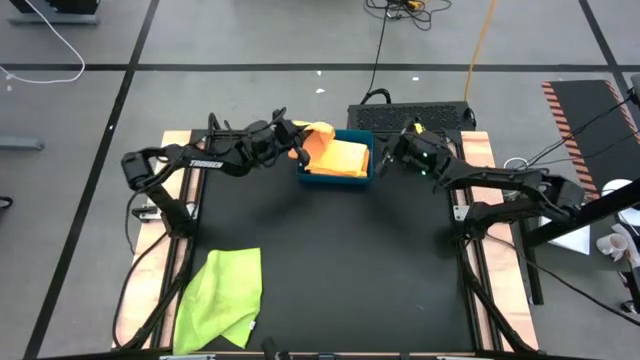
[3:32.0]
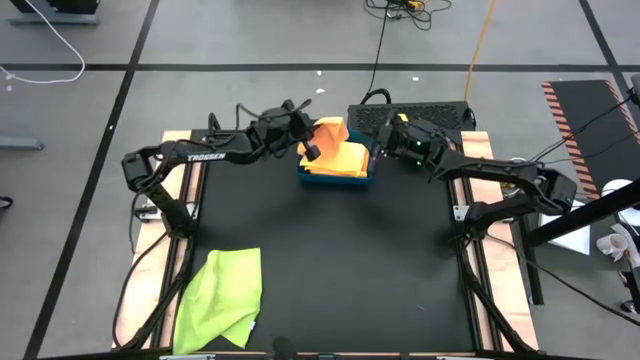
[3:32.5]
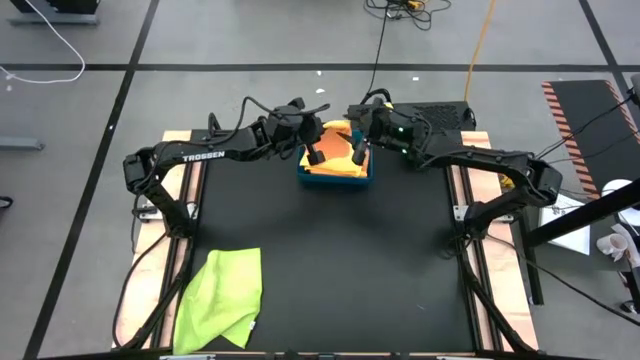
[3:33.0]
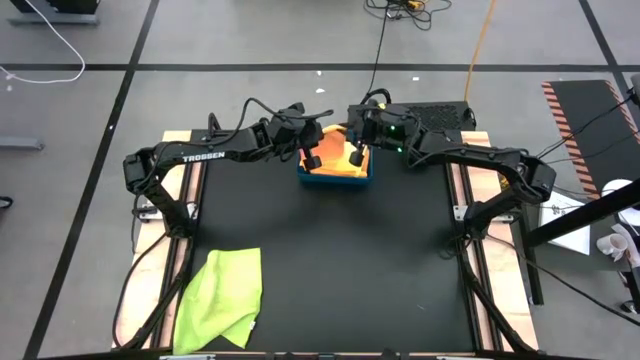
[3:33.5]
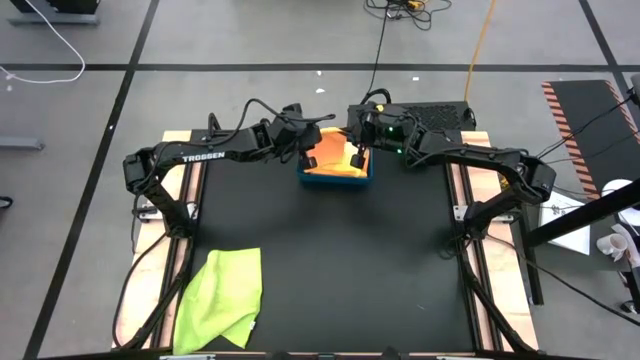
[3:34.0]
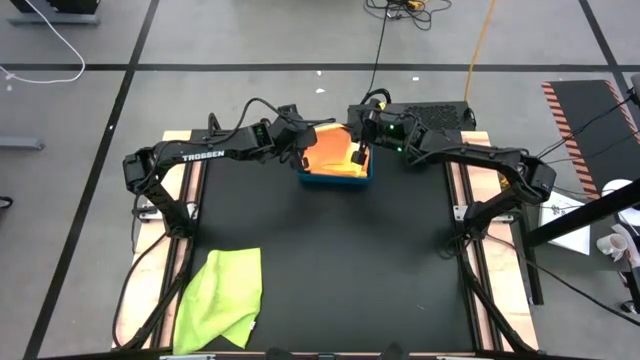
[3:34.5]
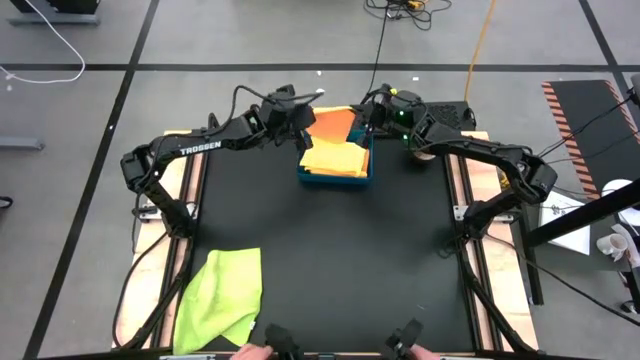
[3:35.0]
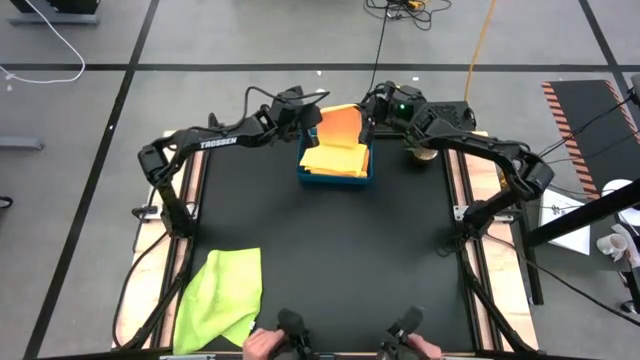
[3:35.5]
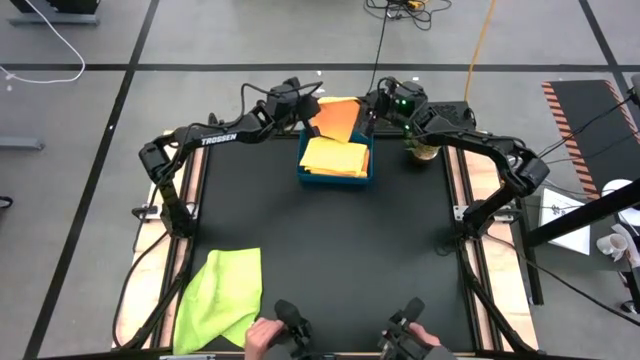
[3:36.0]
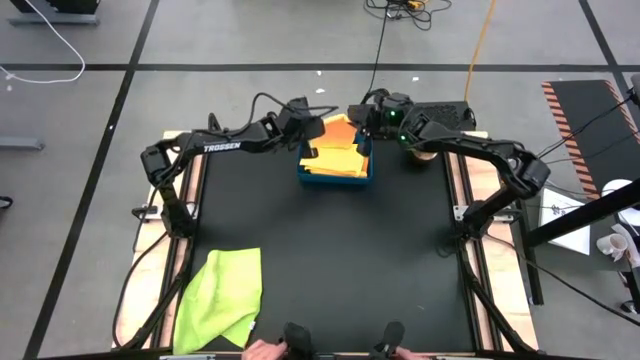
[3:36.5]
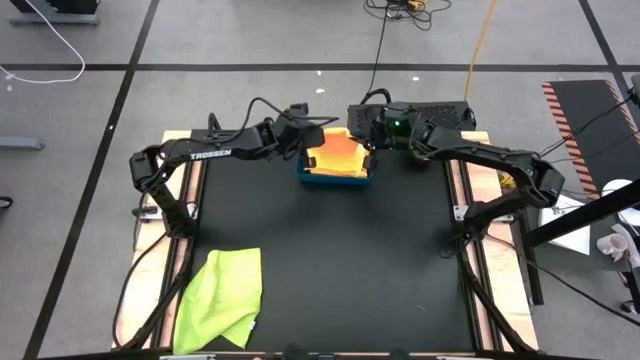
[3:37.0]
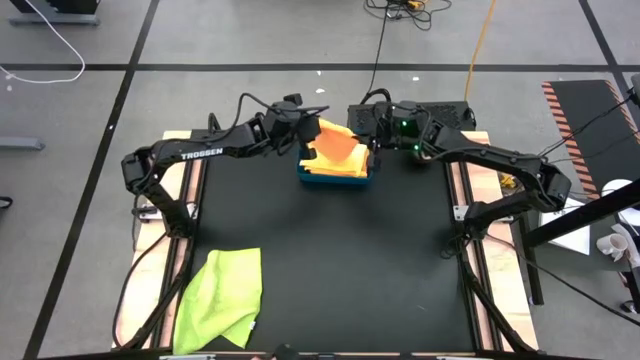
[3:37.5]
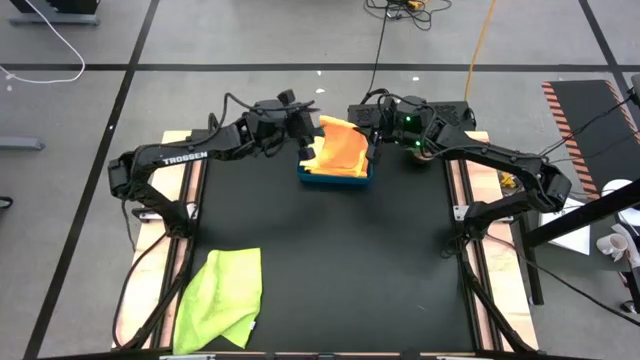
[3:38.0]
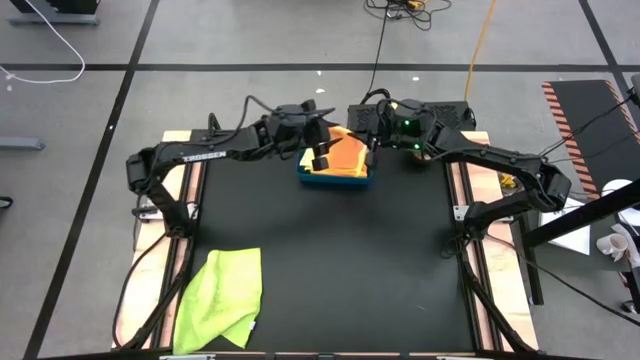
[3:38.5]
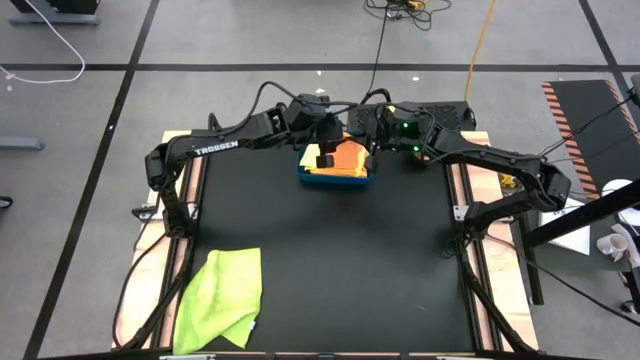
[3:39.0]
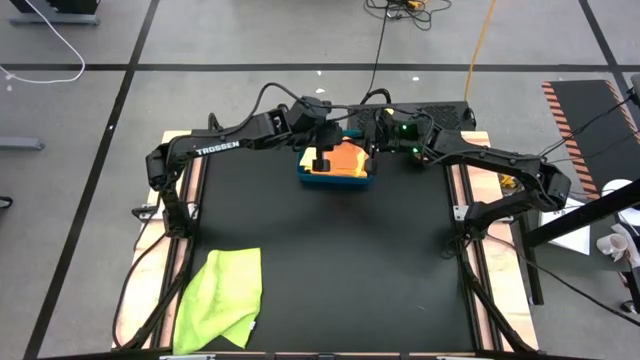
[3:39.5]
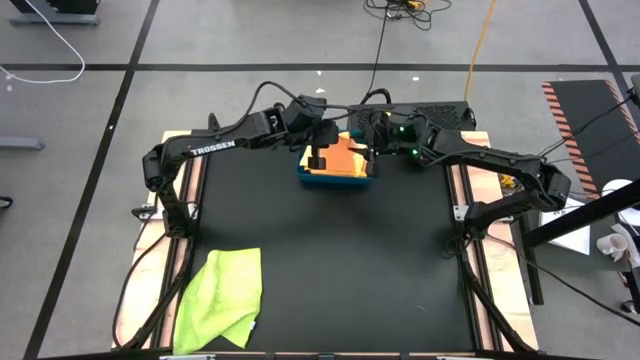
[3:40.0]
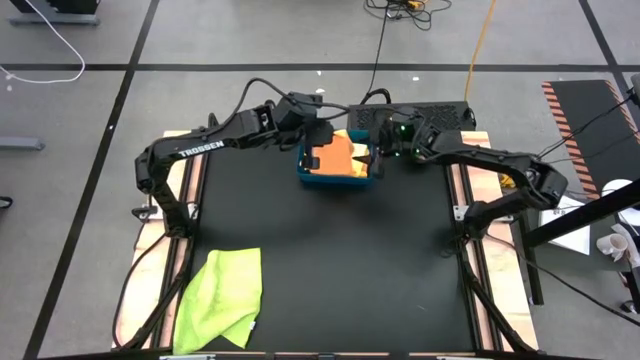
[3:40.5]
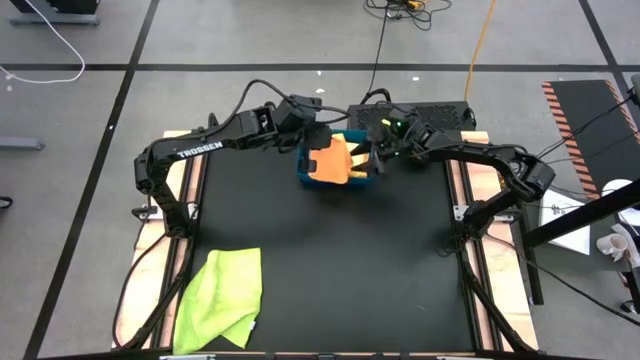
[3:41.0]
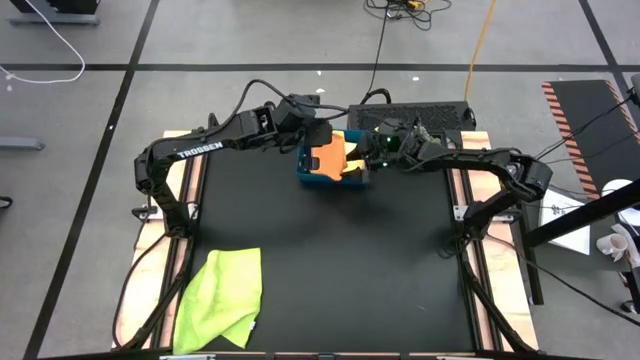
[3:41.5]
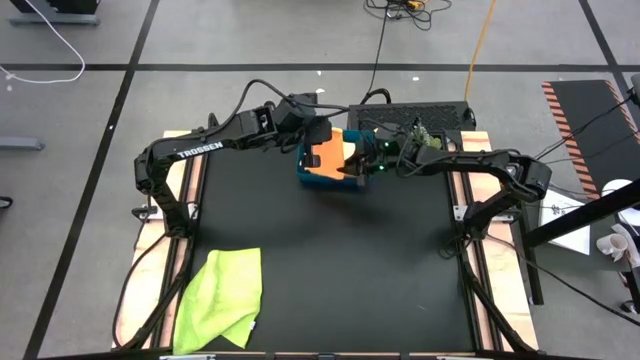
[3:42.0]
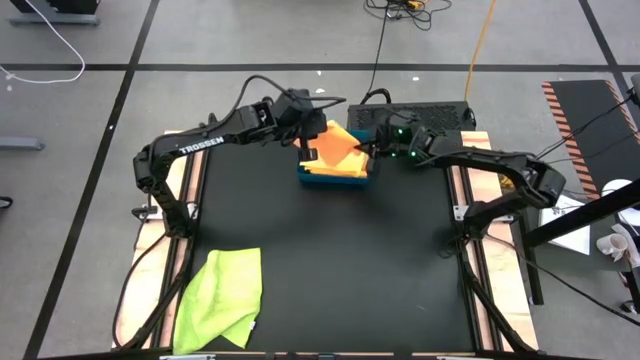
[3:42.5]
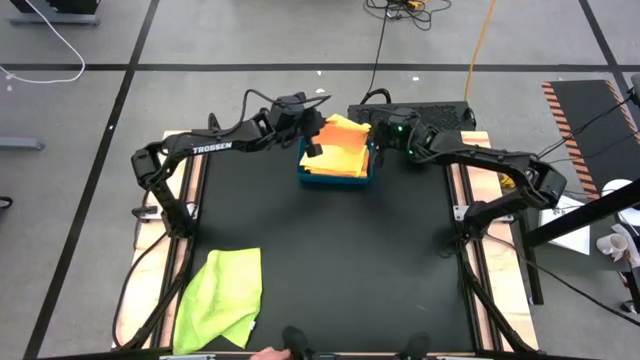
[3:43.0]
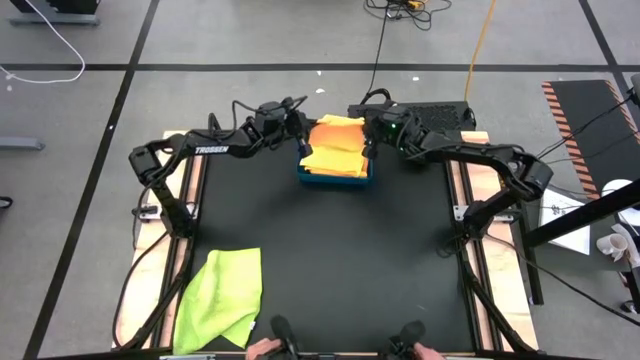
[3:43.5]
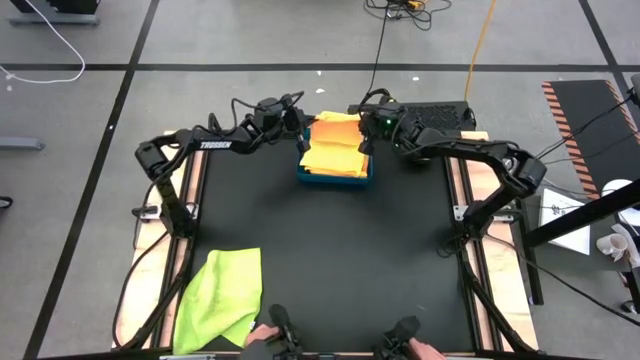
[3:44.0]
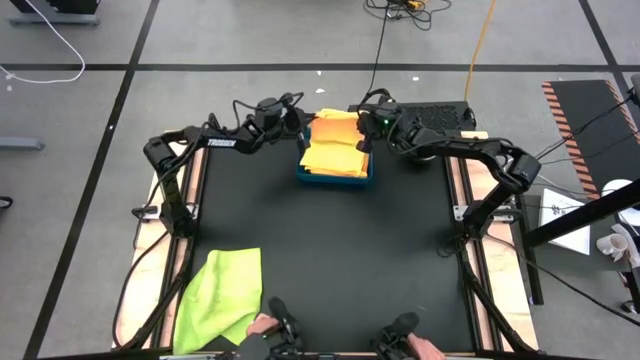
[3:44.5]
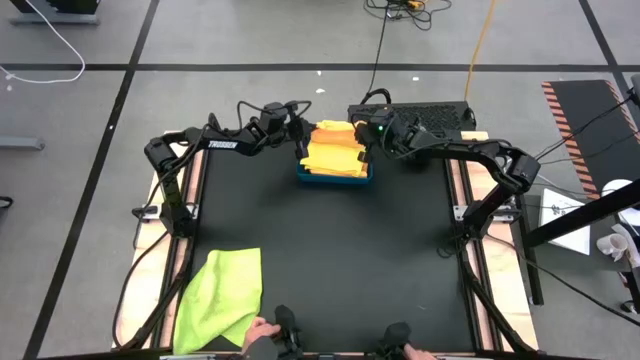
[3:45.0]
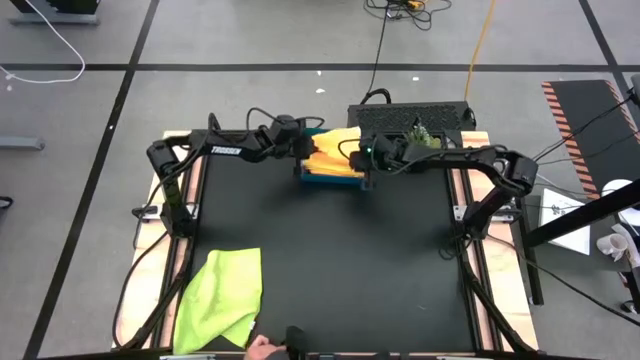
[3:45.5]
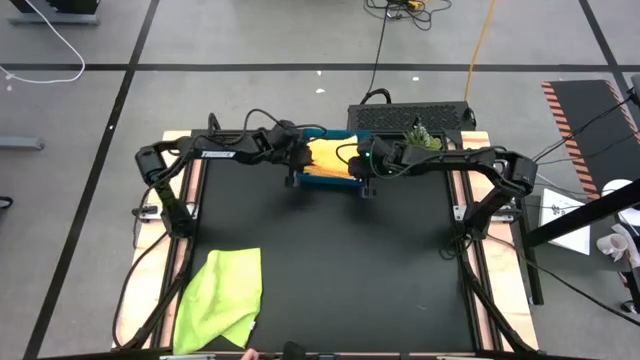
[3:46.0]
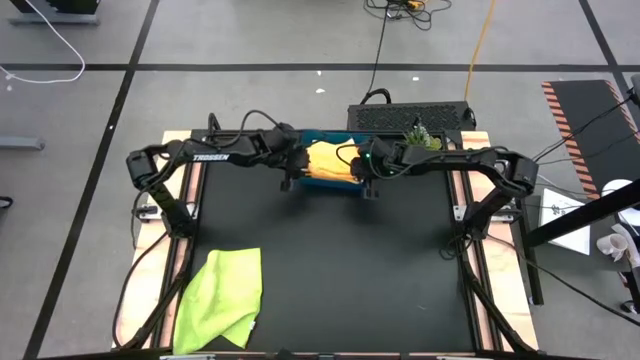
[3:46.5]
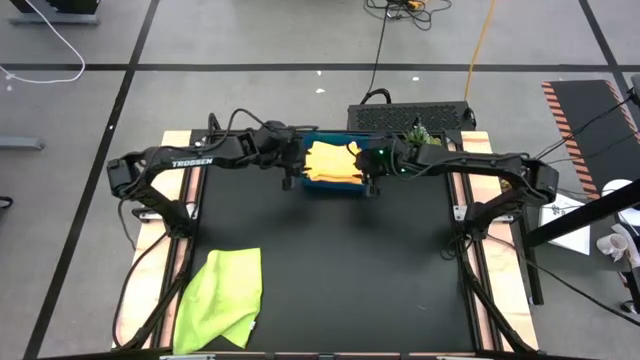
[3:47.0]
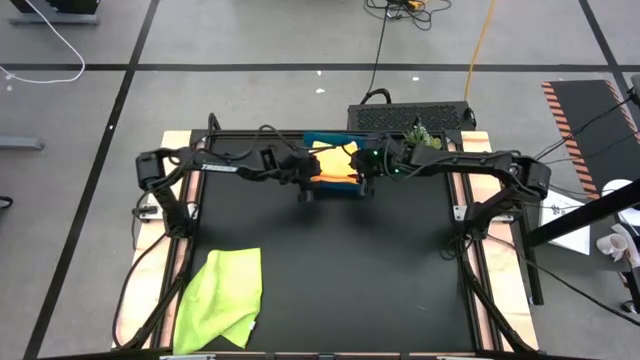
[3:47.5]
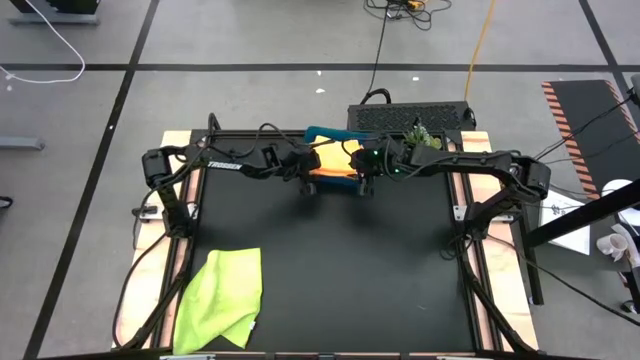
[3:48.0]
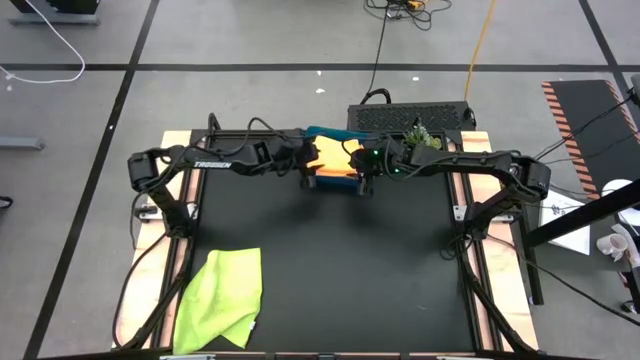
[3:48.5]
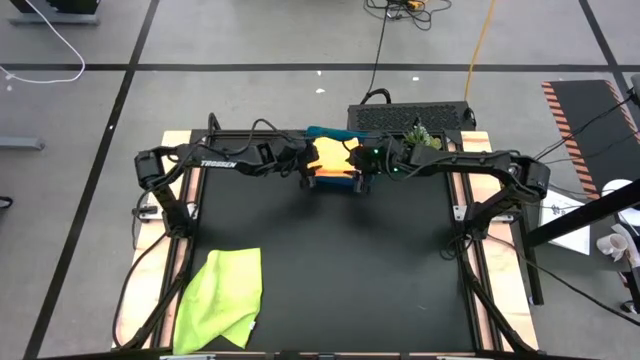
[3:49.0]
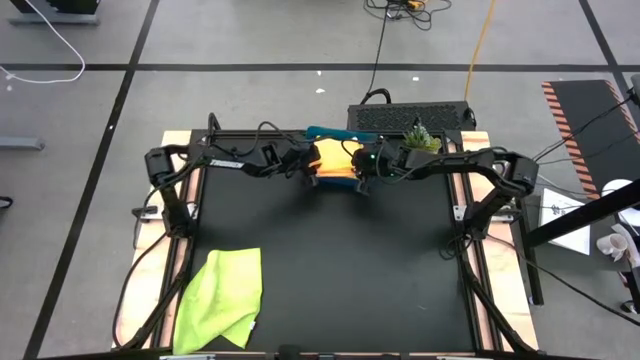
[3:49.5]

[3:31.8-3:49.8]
Task: Fold microfiber towels
Put the orange microfiber cloth into the dark blue bin

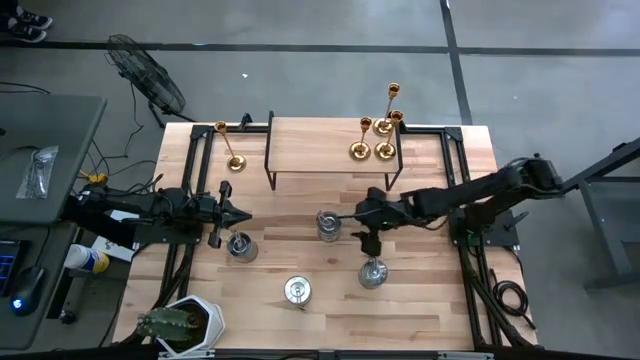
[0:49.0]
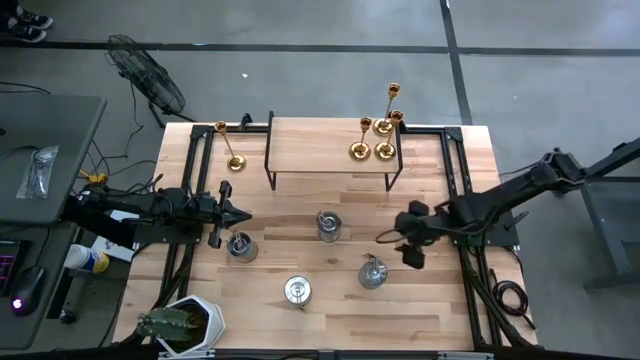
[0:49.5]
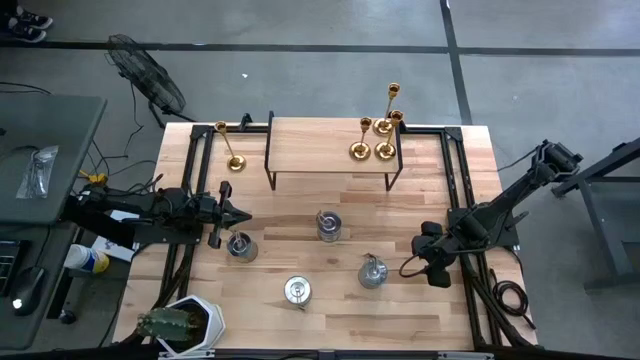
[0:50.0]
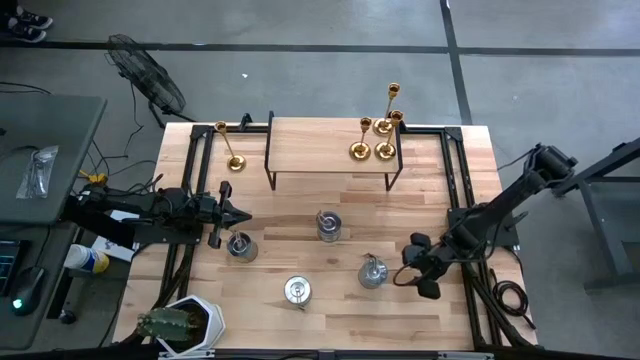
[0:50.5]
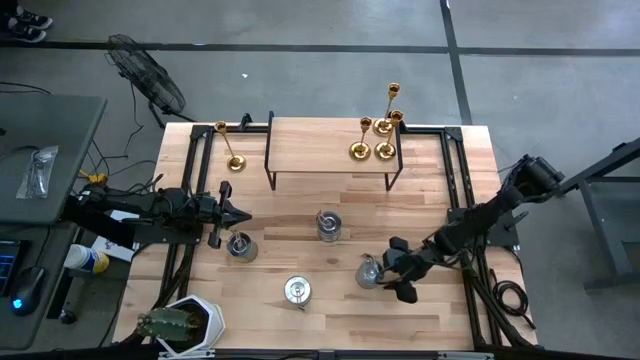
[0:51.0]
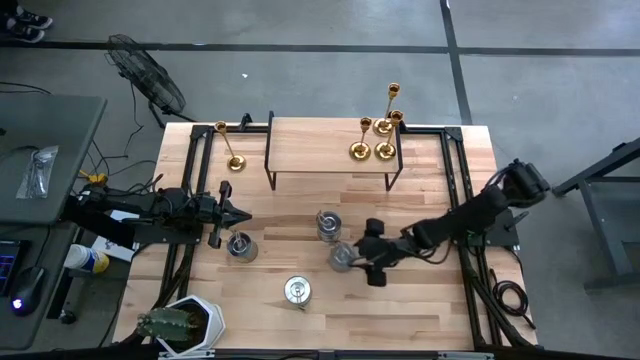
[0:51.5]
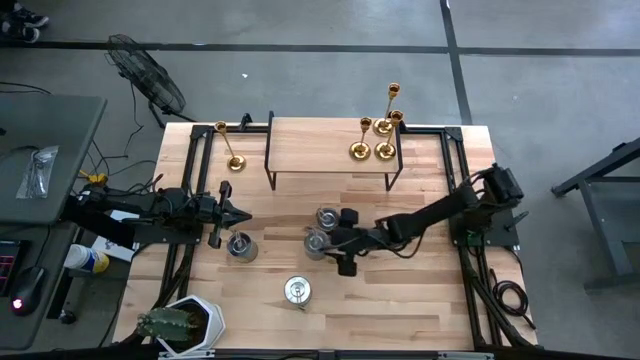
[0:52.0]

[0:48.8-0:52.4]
Task: Pick & Place candle stick holders
Move the middle brown scented candle to the center of the table

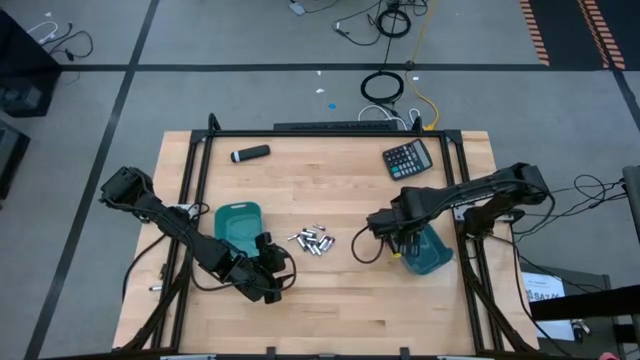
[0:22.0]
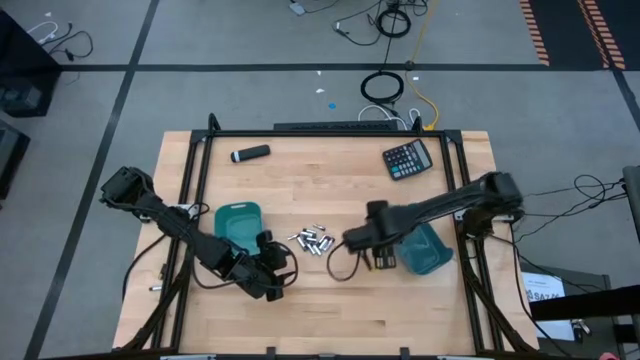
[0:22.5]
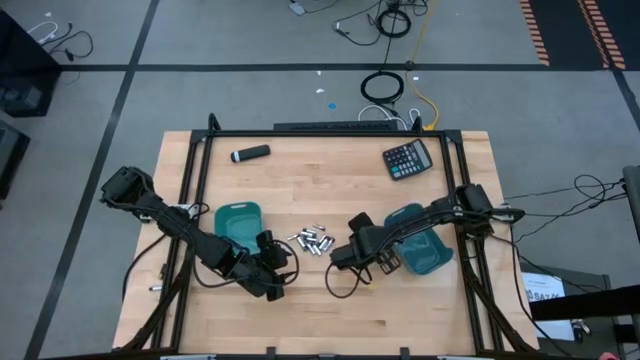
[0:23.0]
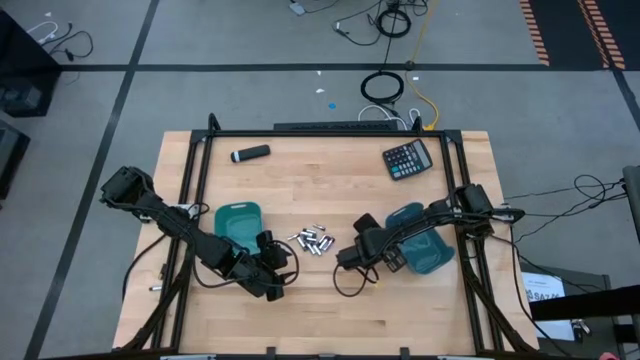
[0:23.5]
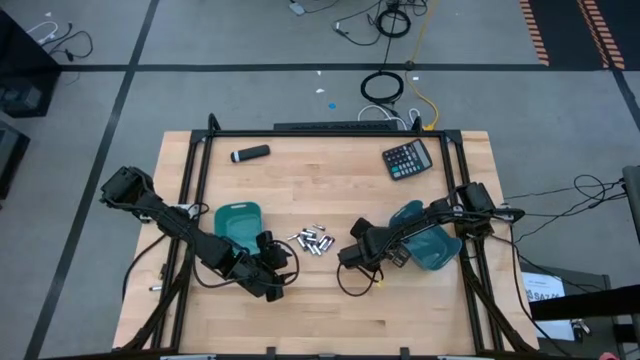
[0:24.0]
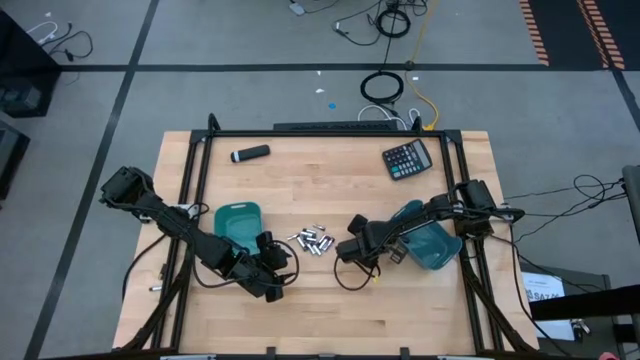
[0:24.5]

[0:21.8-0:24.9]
Task: Sort batteries
Put the black battery into the blue bin
